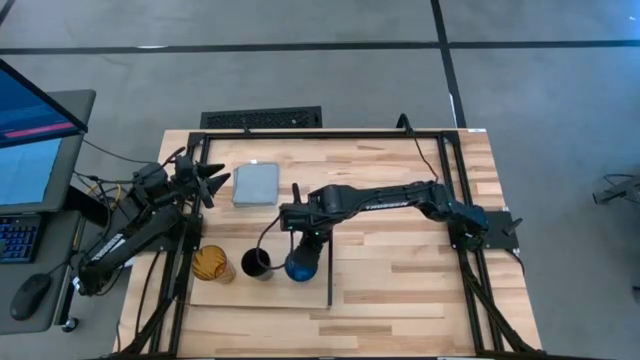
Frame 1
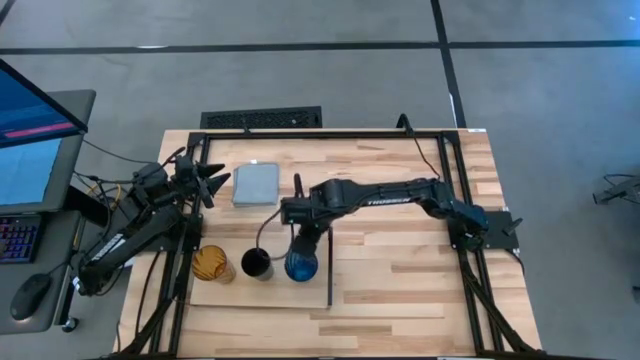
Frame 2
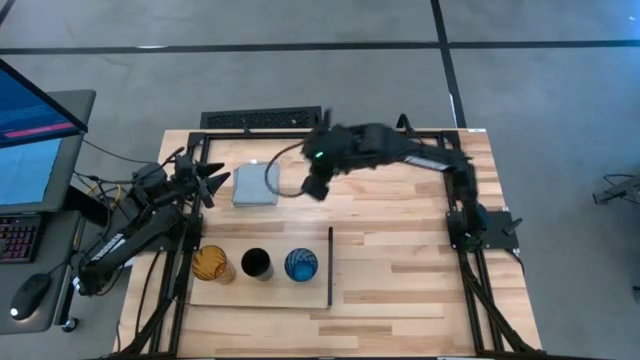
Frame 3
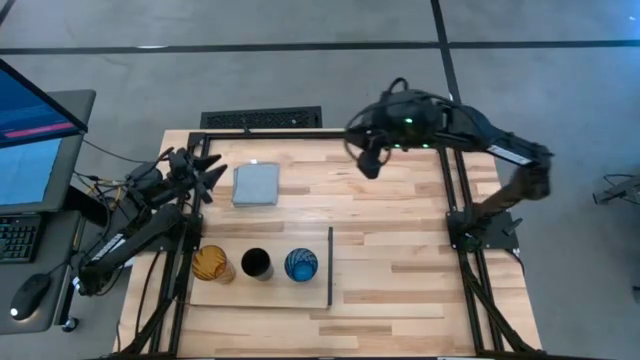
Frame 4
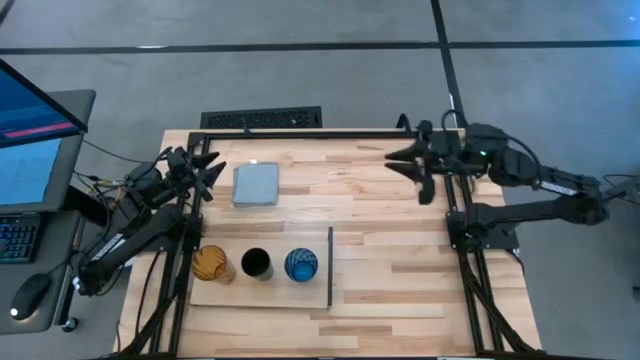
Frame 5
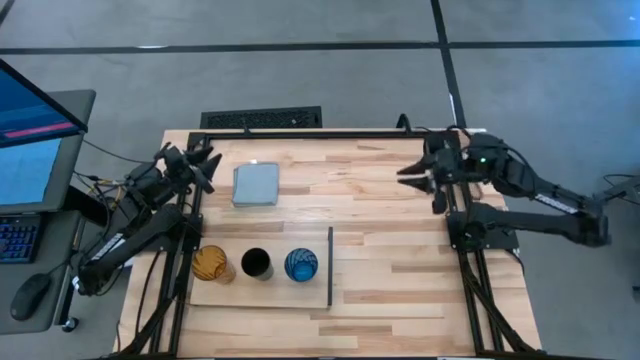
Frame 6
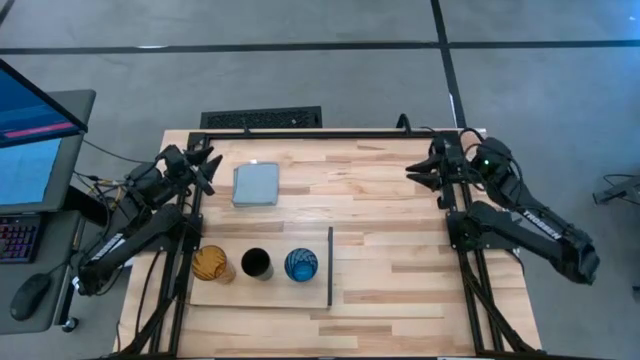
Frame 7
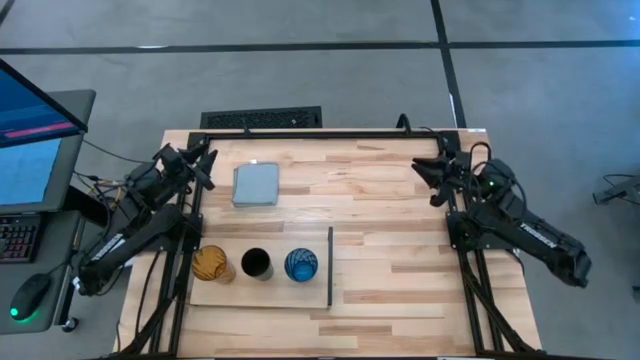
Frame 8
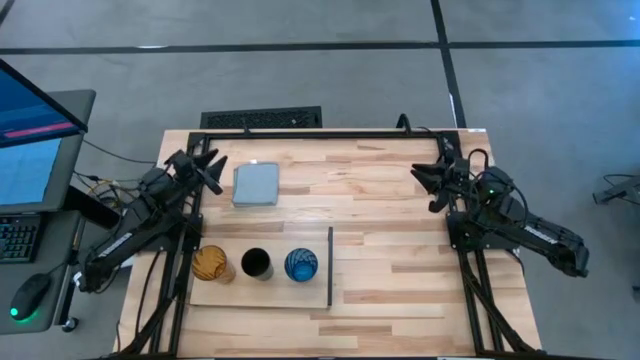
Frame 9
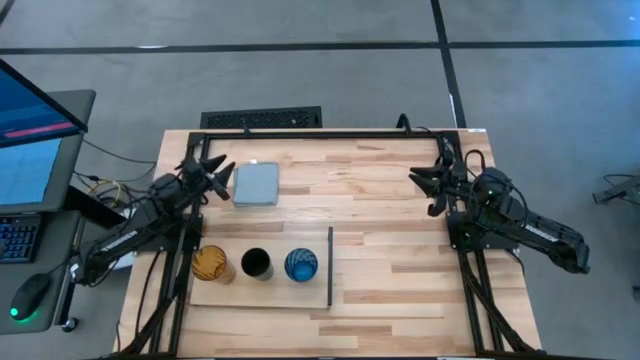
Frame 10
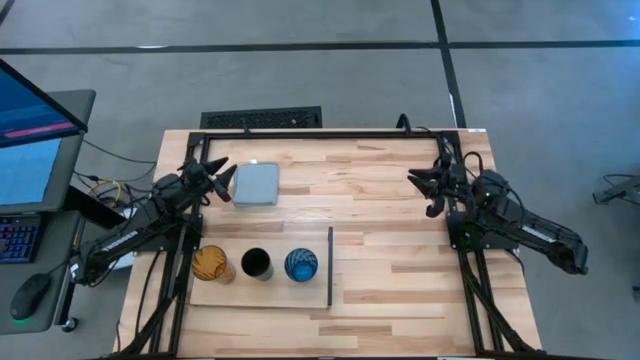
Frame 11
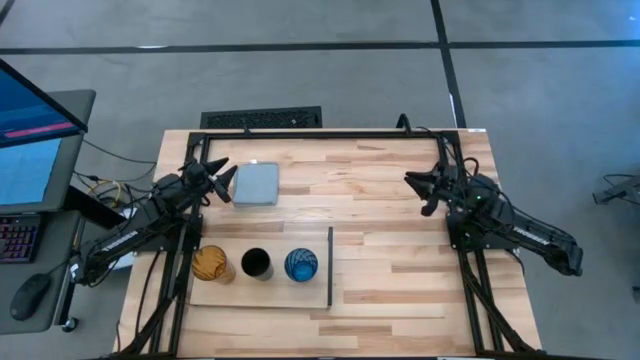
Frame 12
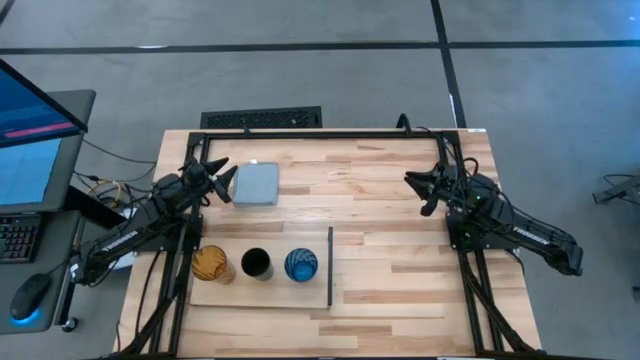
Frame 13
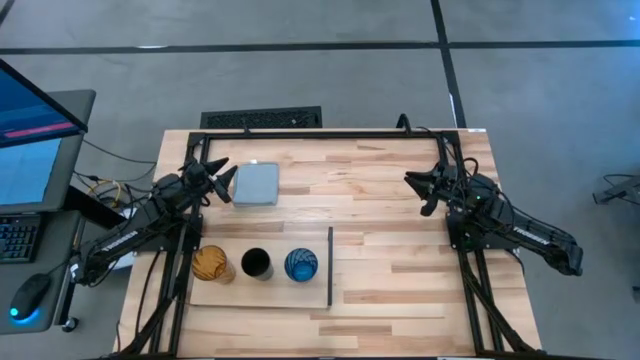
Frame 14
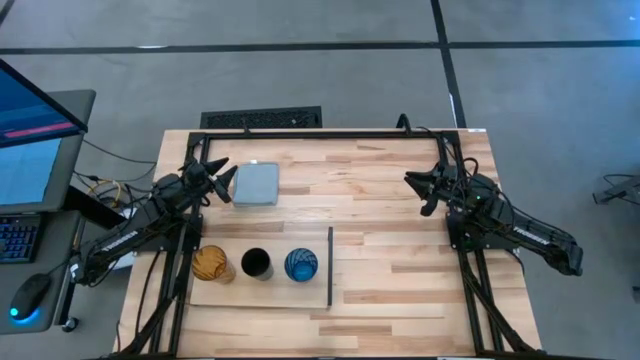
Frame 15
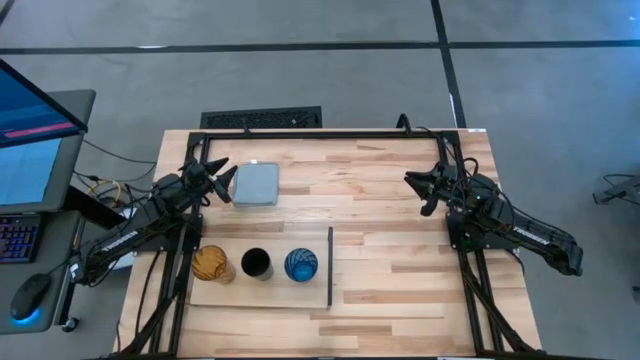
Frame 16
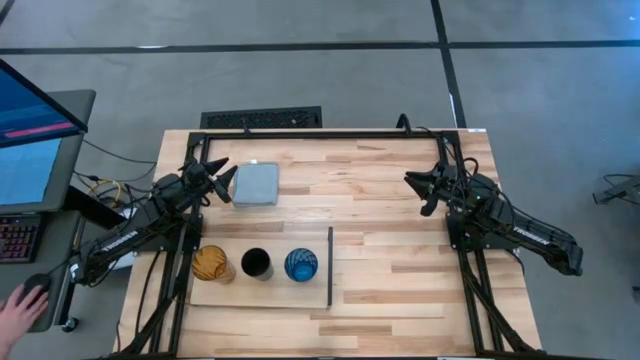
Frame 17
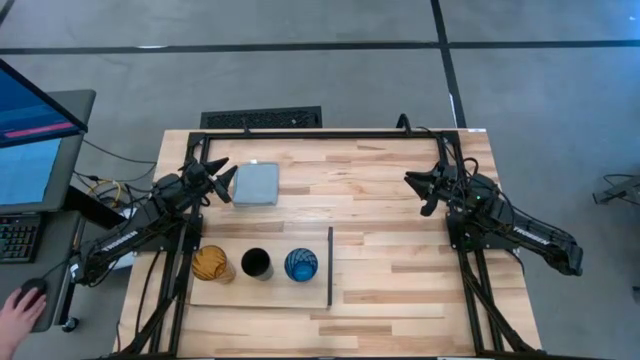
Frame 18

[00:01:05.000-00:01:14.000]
Task: Stack small to large cups/mugs on shelf
Return to Home Position

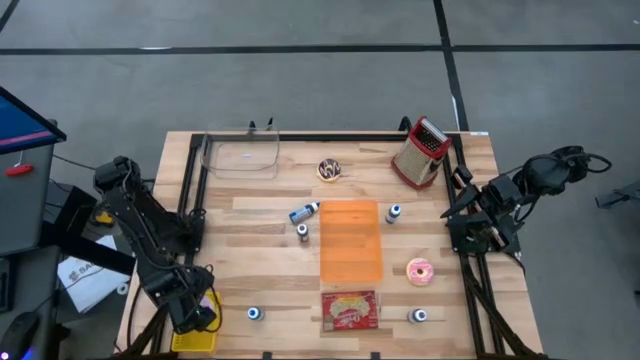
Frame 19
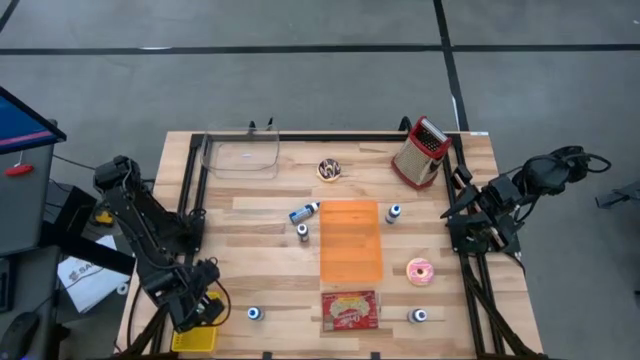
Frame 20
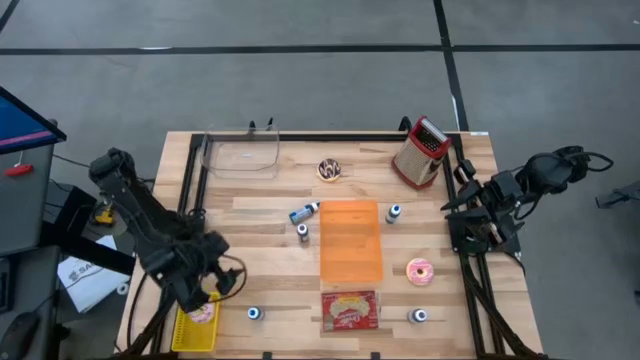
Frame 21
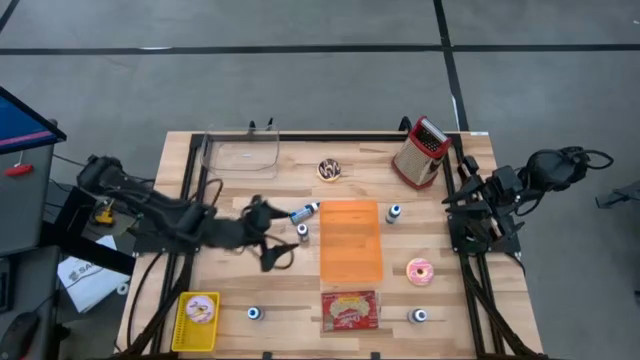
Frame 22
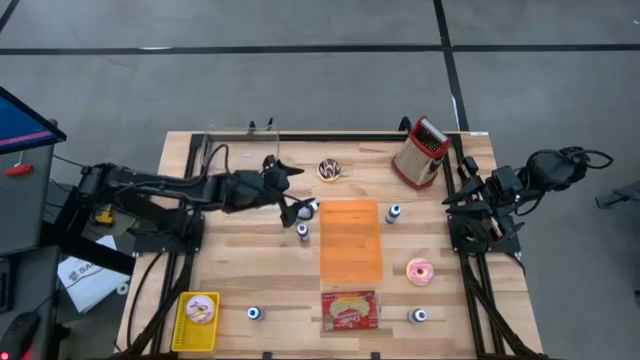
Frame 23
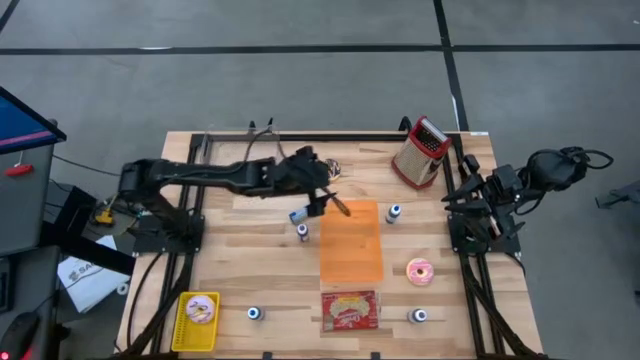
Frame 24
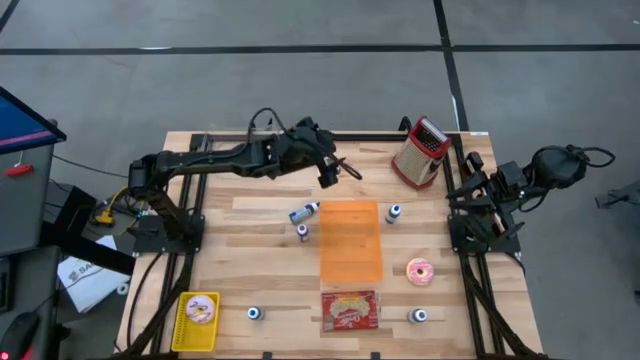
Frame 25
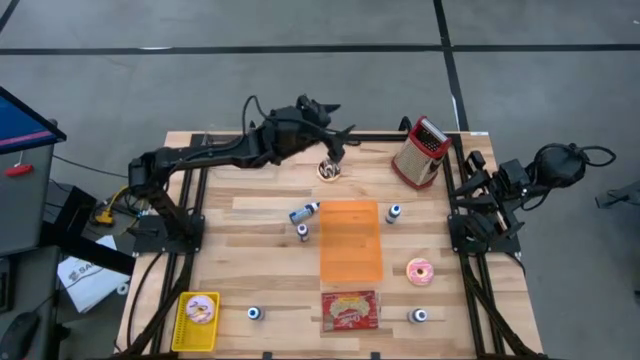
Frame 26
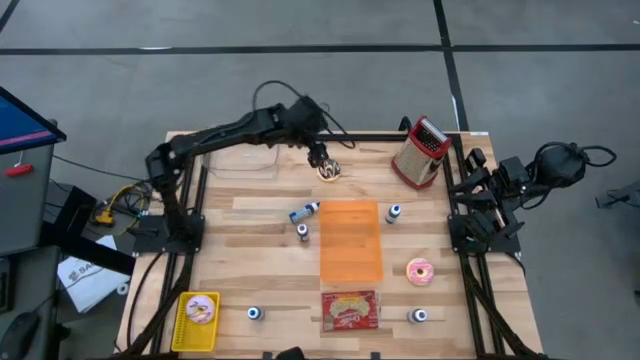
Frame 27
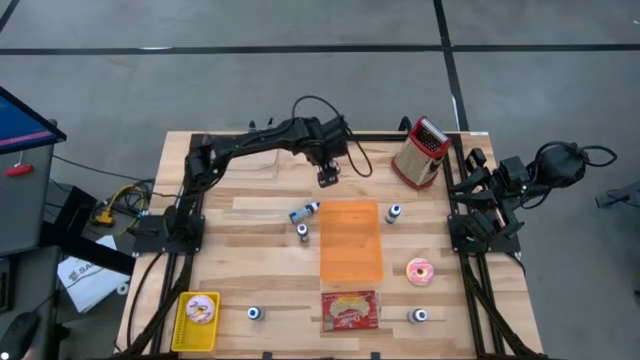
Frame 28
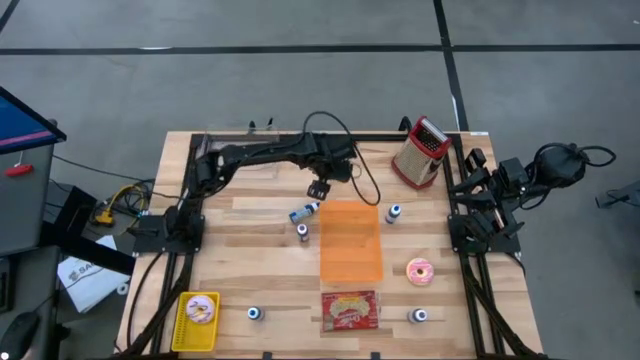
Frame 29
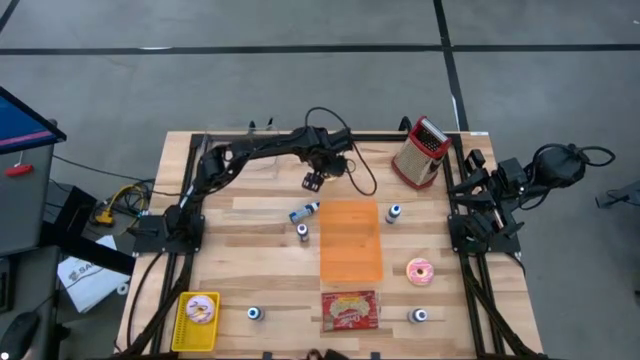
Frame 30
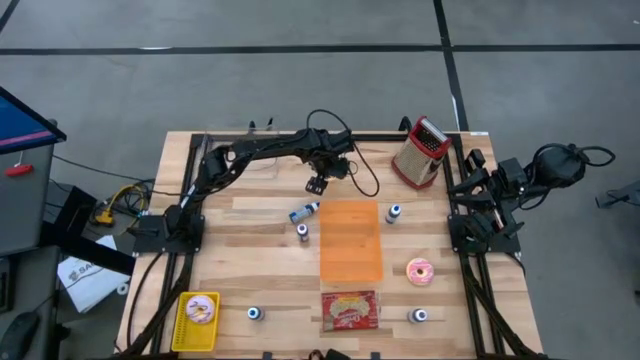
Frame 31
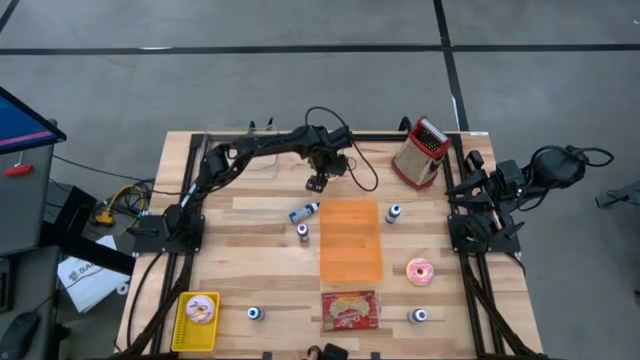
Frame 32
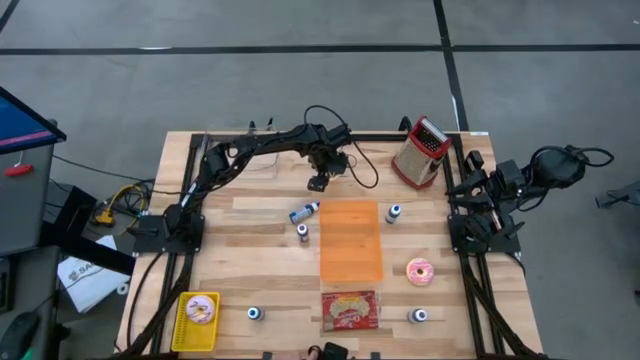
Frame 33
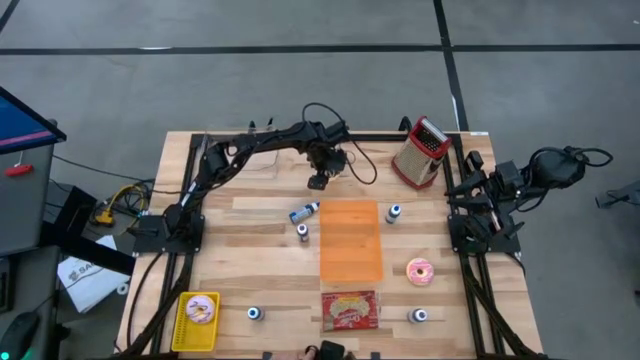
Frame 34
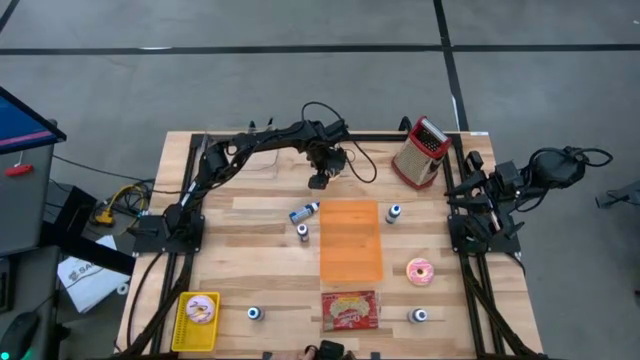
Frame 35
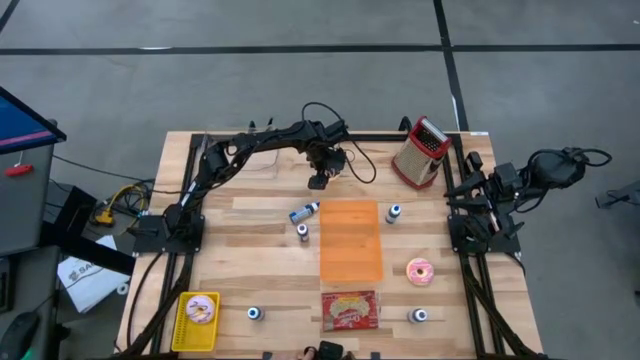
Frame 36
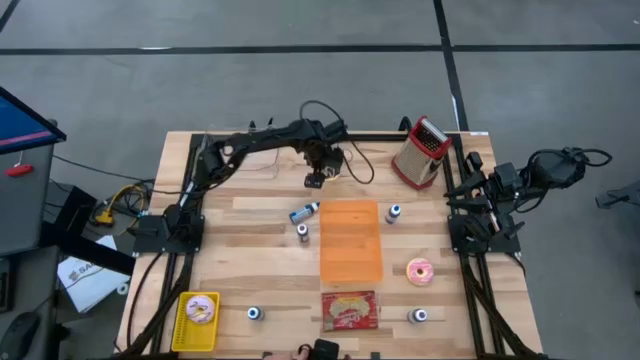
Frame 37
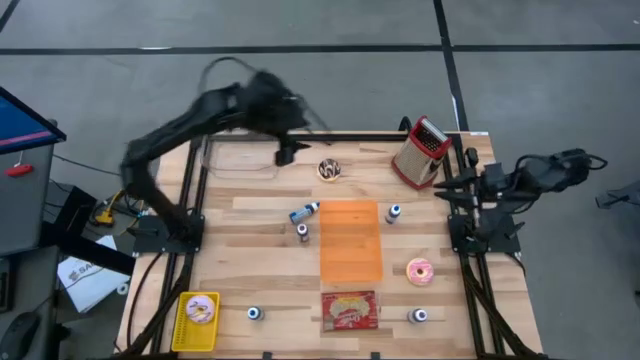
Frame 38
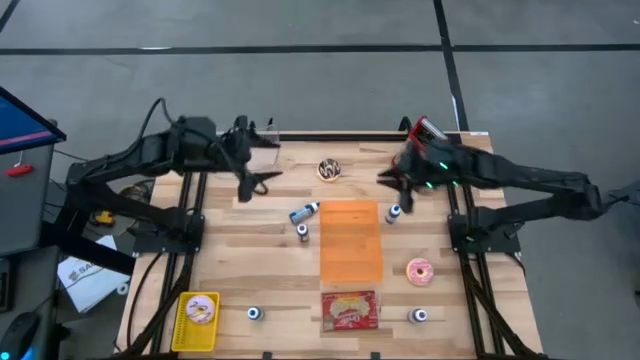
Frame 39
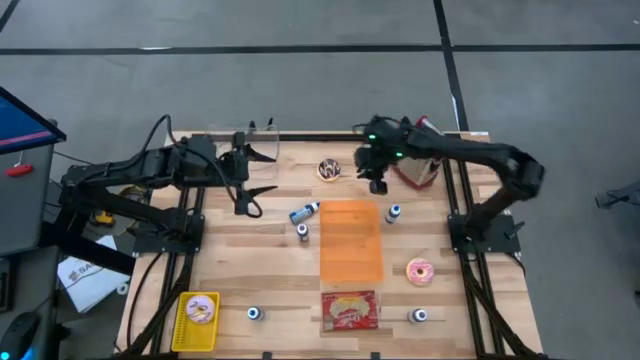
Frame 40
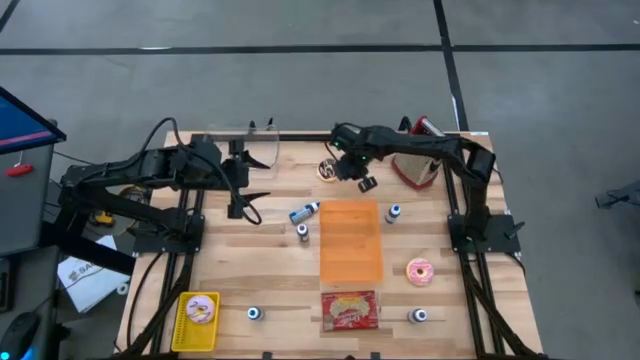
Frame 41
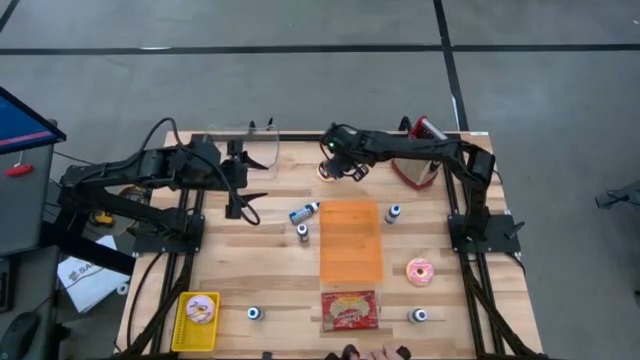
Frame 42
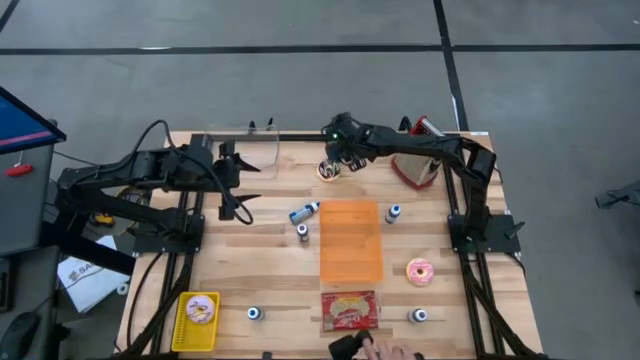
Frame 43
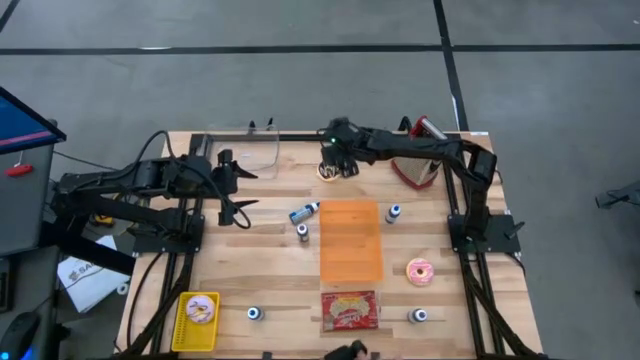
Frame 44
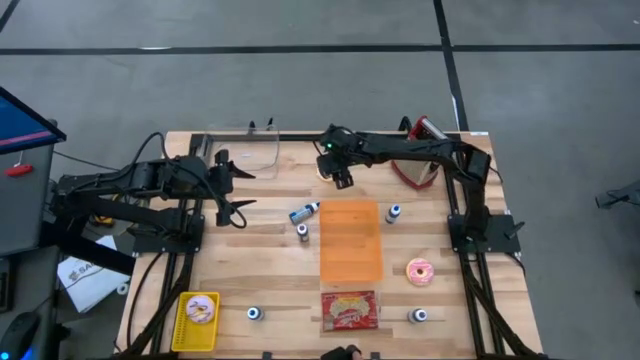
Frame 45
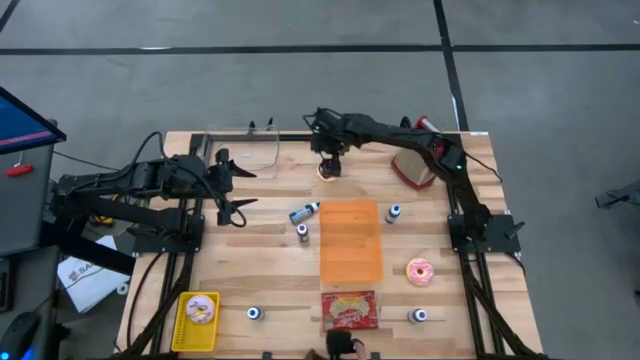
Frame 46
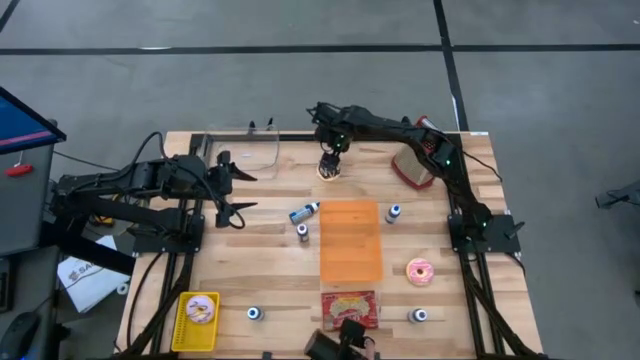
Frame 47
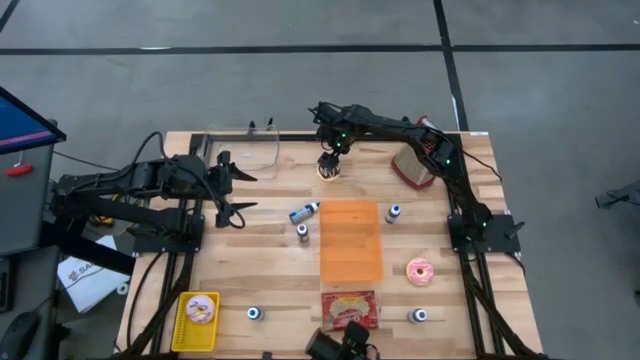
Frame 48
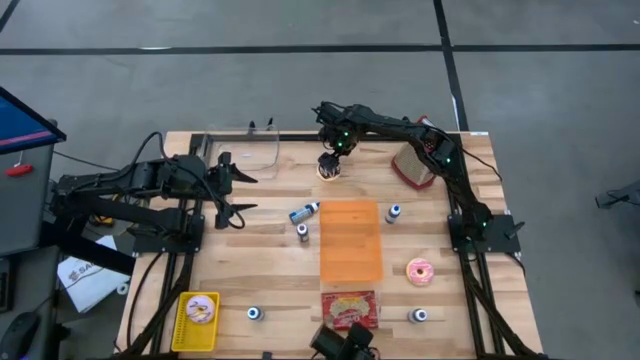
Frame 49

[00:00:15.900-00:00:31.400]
Task: Pick & Place Food Item
Put the black donut into the yellow basket
